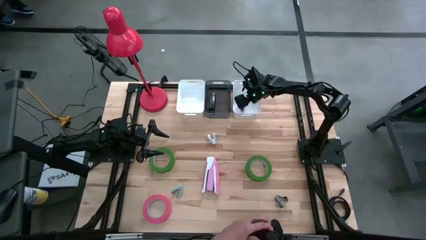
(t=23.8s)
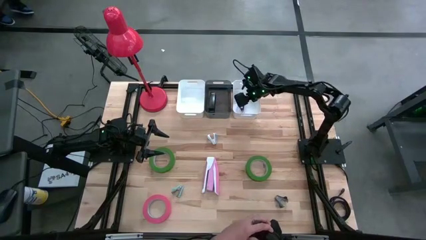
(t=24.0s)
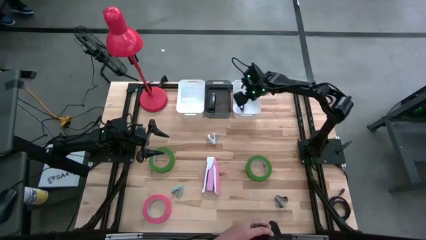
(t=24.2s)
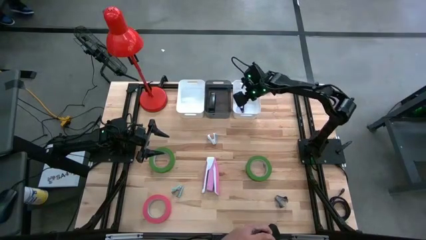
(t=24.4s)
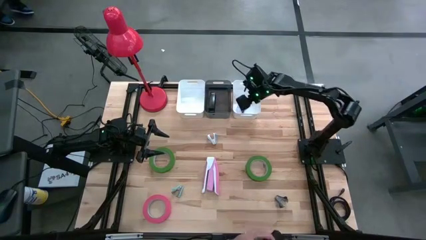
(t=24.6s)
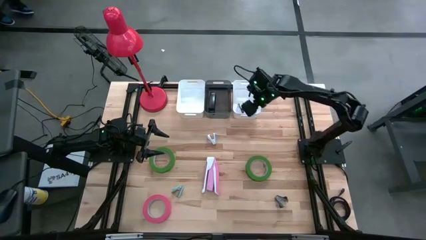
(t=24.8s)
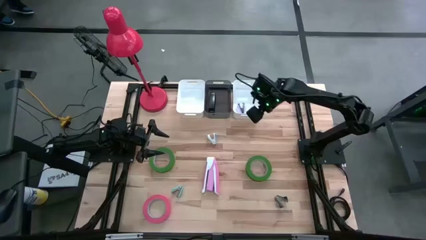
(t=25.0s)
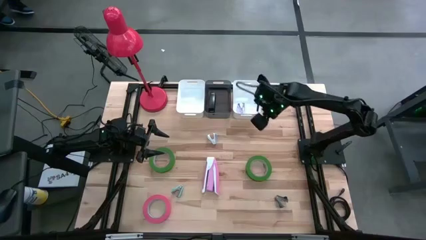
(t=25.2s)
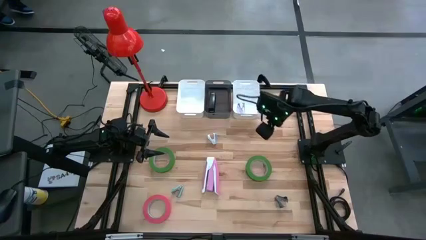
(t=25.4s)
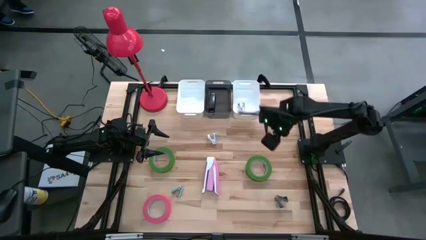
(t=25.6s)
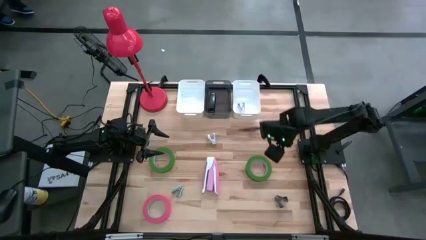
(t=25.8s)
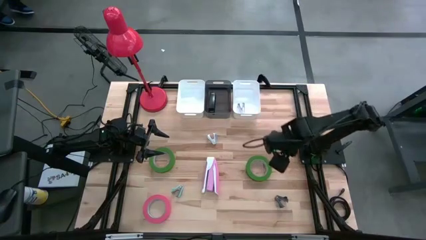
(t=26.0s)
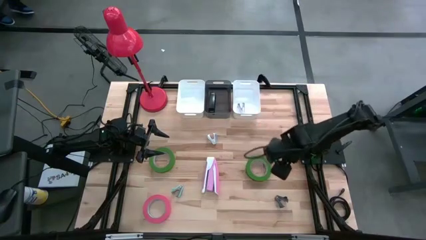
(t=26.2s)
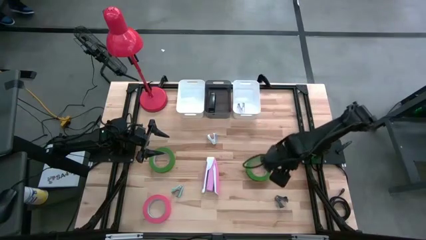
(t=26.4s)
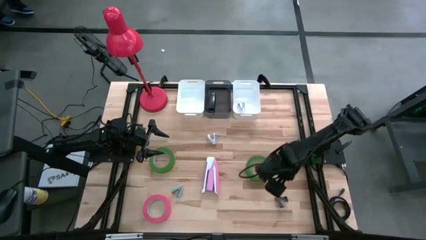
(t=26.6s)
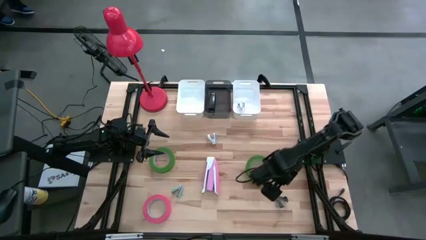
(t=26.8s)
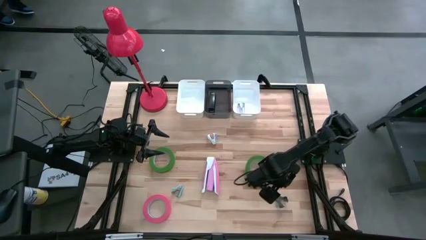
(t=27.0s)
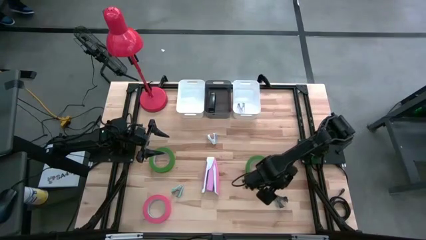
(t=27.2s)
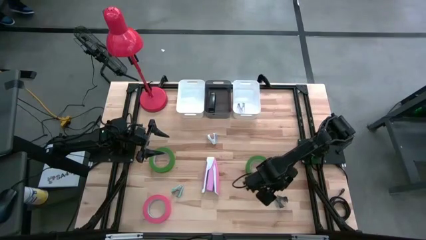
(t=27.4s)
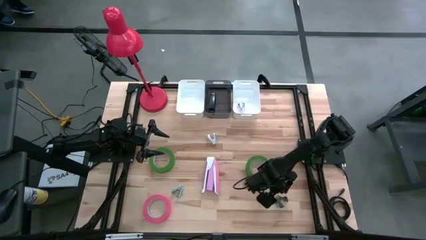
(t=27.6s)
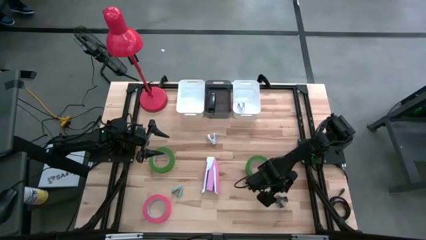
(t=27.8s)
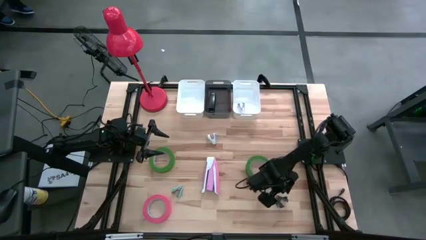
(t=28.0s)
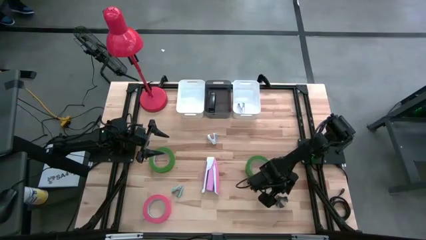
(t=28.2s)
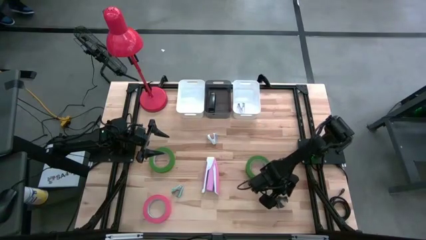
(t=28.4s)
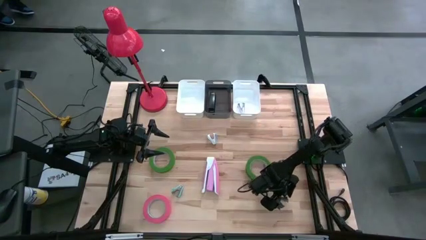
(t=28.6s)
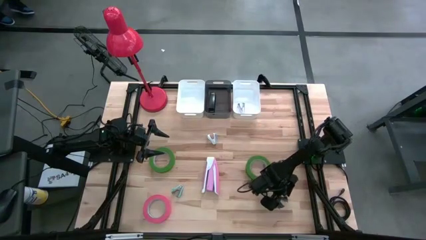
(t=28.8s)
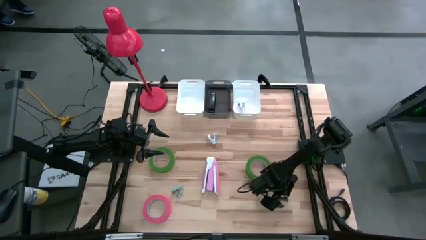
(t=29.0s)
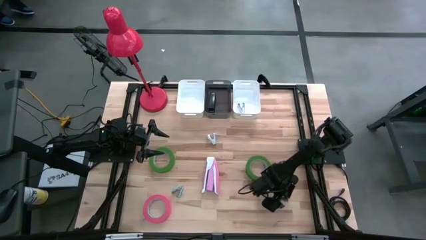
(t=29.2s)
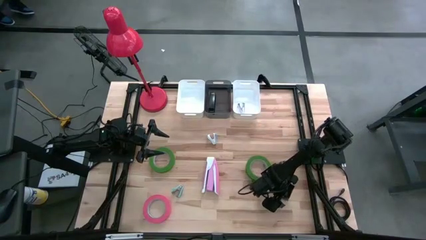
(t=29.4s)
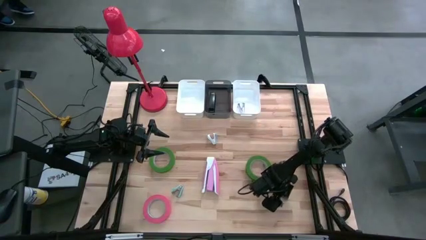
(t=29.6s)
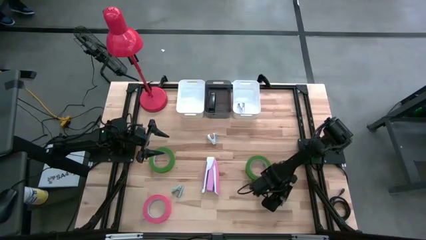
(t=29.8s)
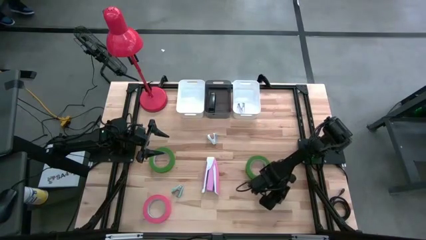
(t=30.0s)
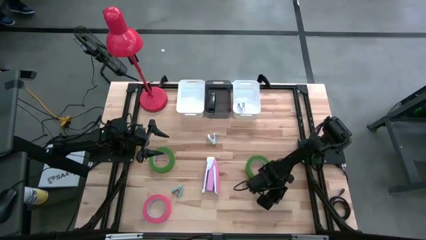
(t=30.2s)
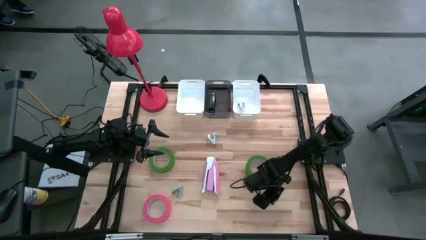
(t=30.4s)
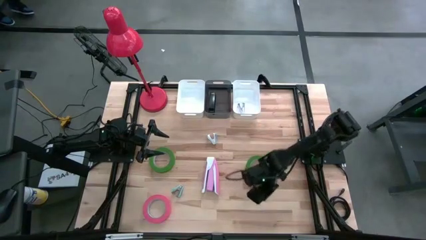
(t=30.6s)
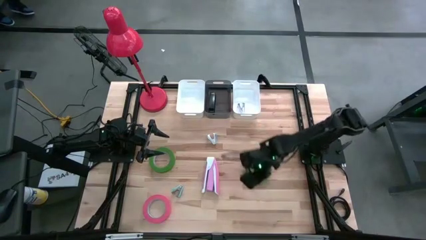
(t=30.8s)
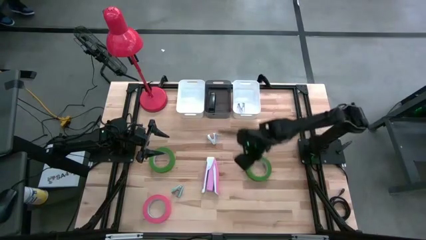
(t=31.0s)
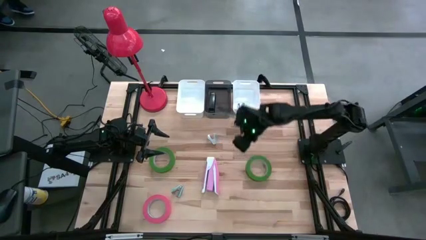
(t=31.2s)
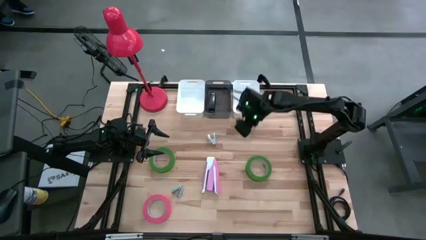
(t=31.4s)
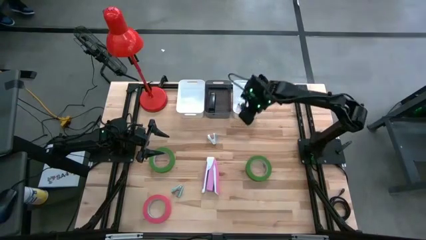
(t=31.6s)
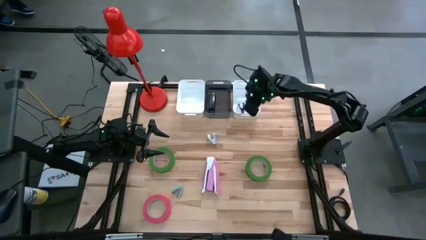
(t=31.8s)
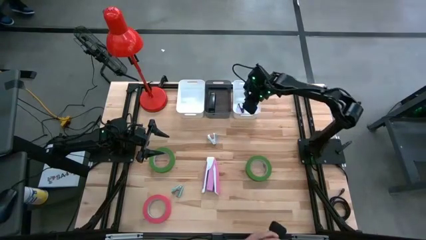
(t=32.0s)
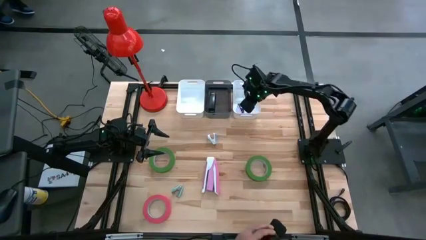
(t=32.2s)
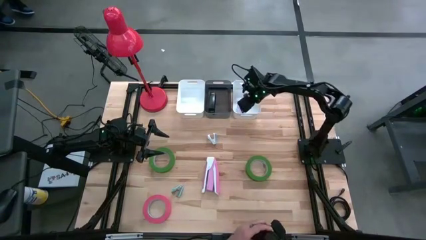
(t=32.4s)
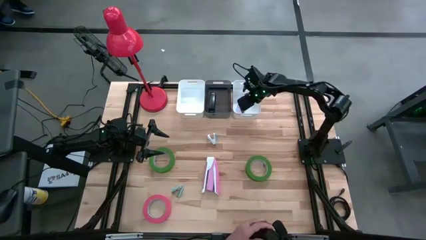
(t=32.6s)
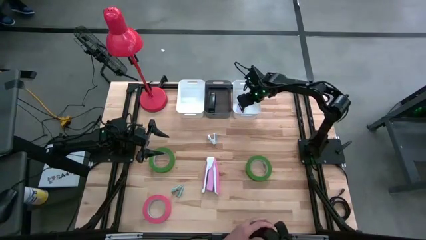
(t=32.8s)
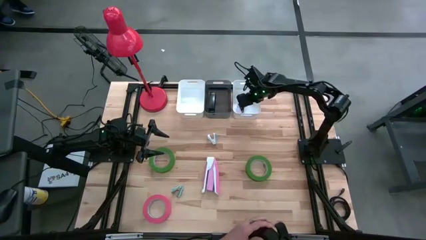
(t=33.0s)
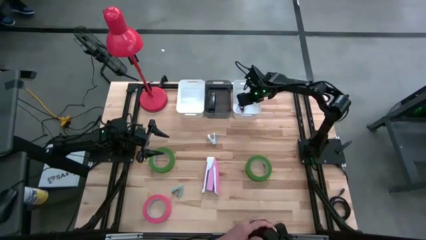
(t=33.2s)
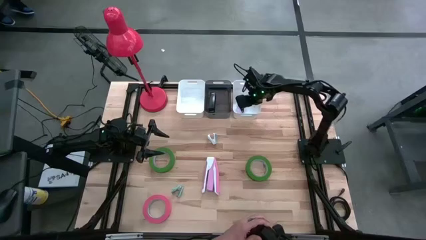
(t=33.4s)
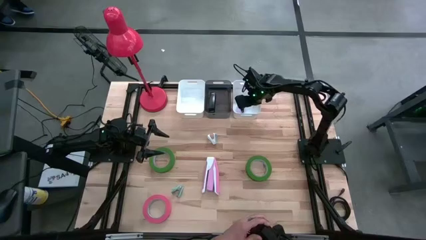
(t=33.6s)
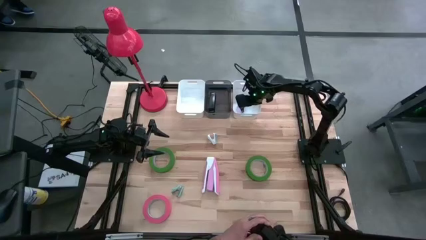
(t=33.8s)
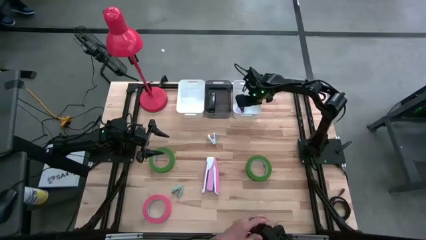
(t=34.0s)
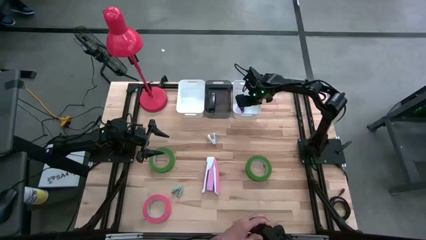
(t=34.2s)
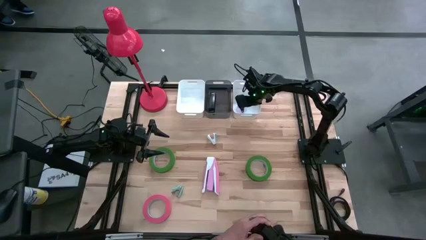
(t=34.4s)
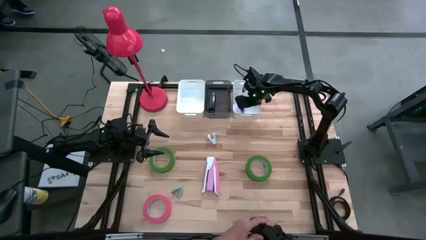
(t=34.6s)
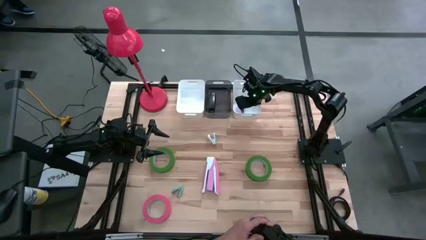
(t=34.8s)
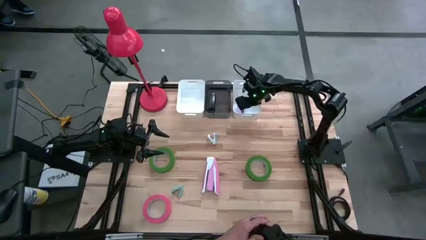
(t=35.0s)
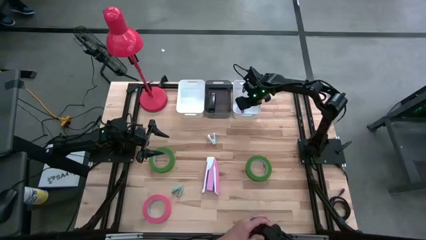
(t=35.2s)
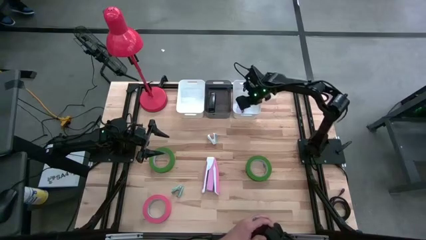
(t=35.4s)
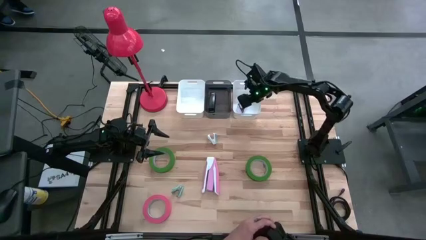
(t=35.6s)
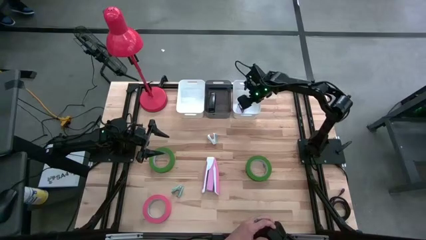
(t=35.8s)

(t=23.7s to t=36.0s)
Task: Pick and place Stapler, Stapler remover, tape
Put the black staple remover into the right white bin
